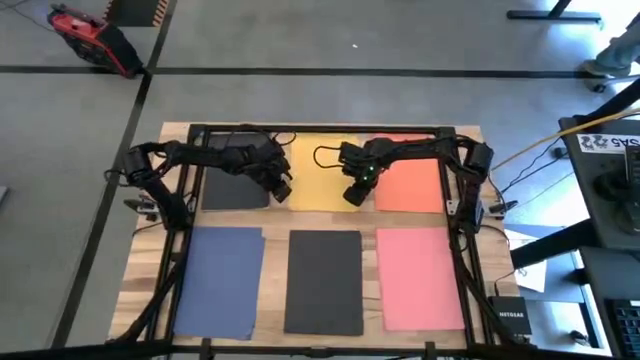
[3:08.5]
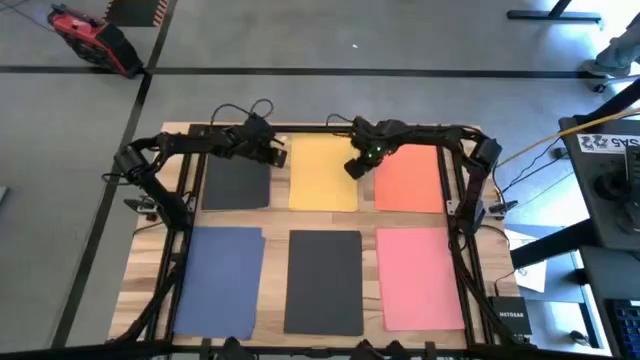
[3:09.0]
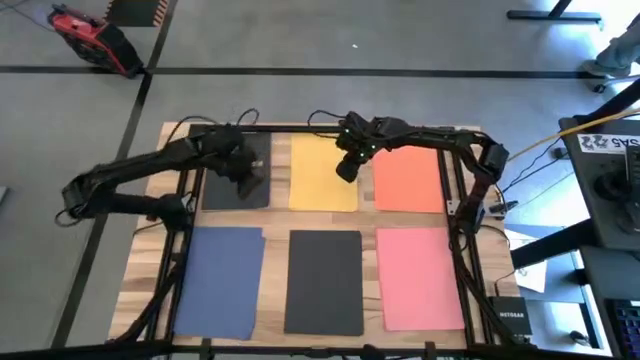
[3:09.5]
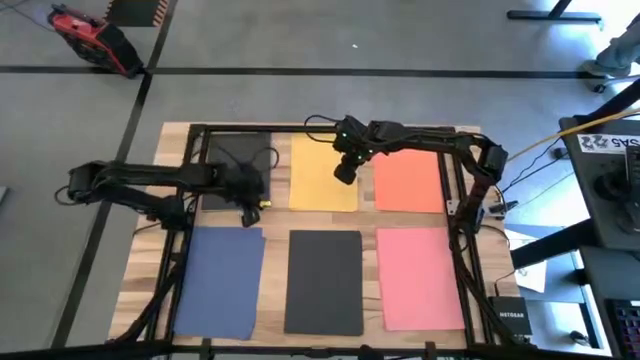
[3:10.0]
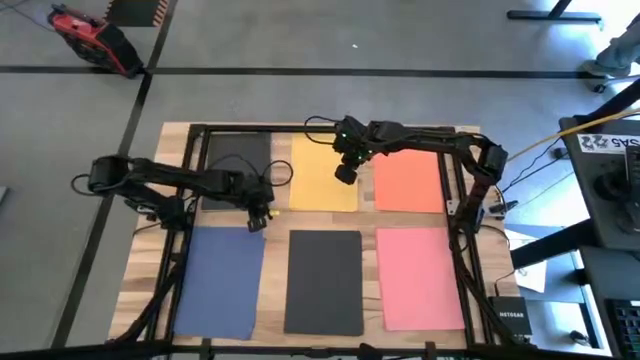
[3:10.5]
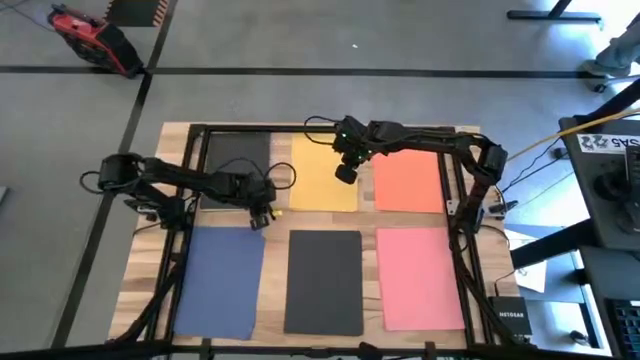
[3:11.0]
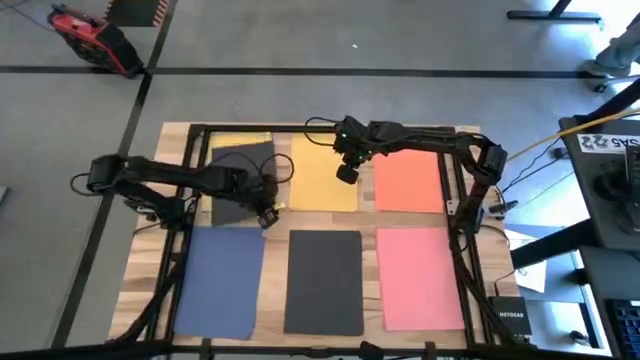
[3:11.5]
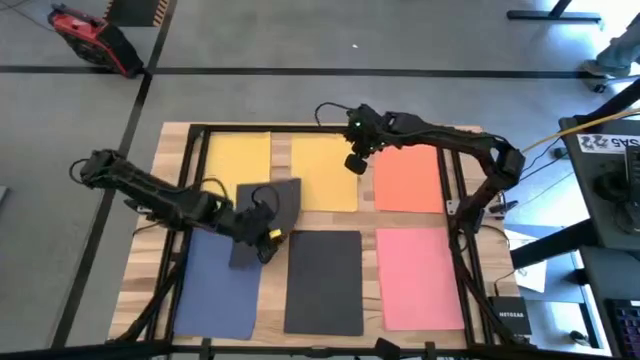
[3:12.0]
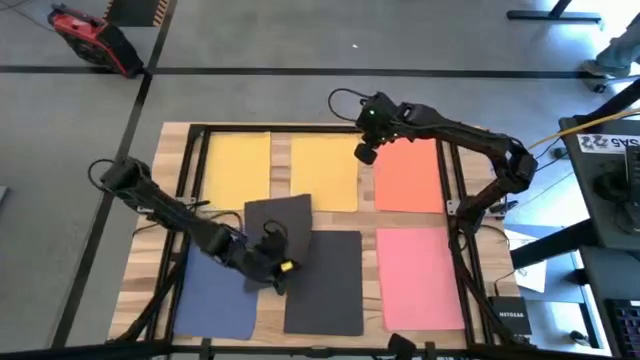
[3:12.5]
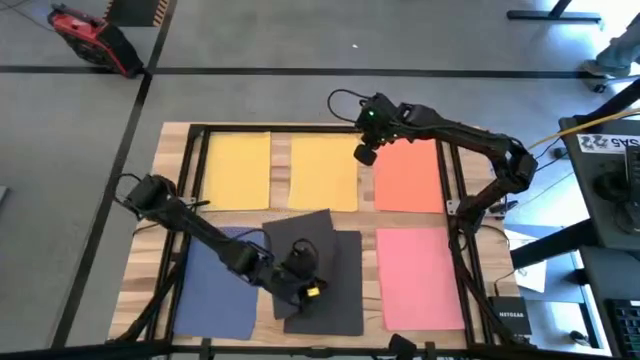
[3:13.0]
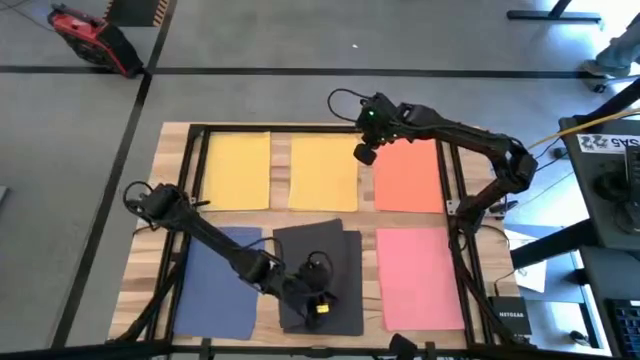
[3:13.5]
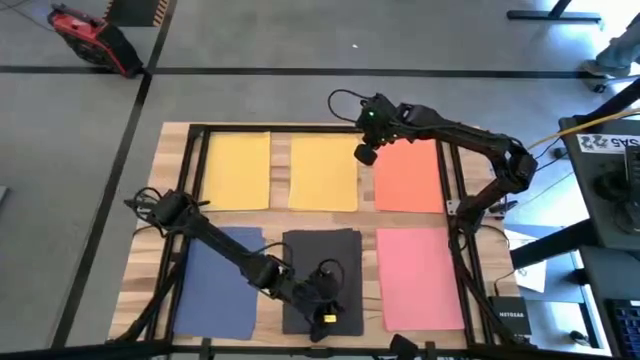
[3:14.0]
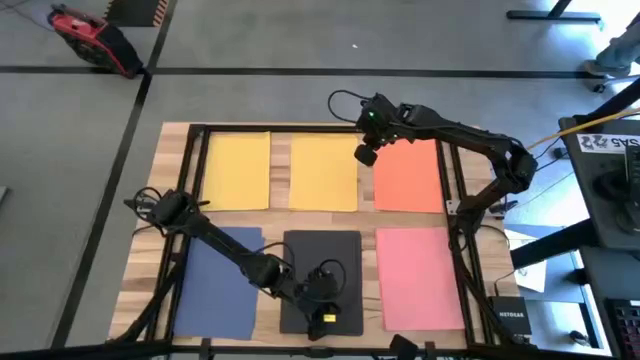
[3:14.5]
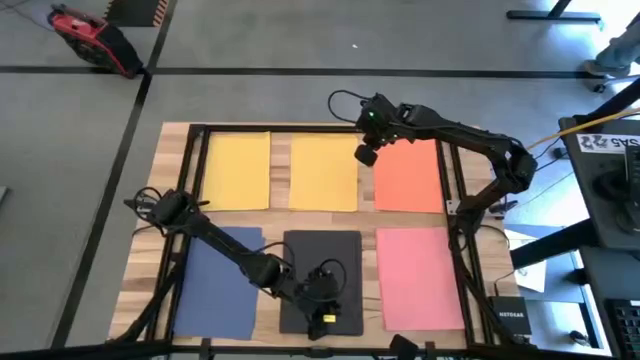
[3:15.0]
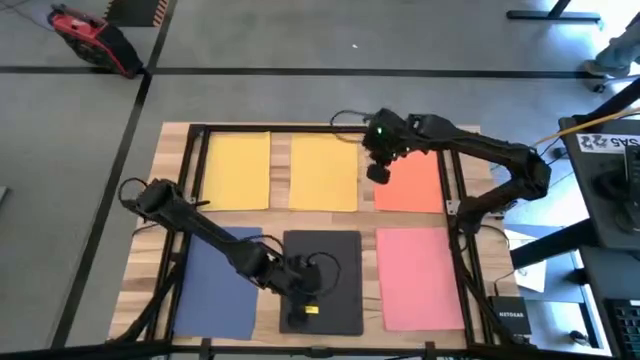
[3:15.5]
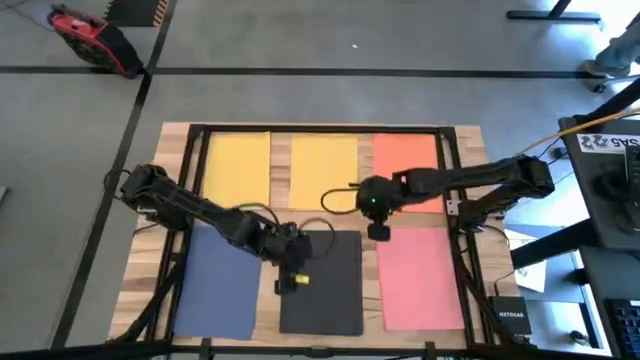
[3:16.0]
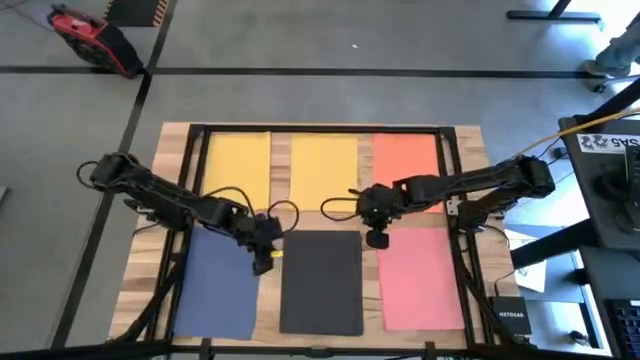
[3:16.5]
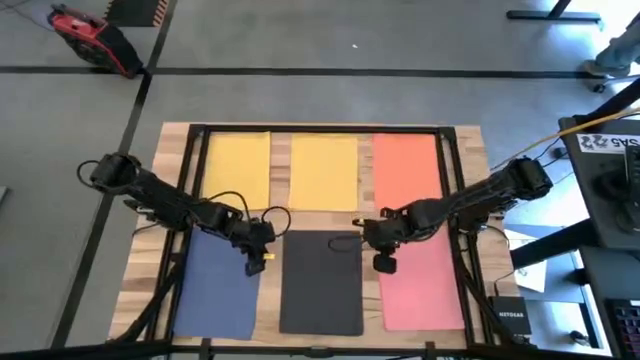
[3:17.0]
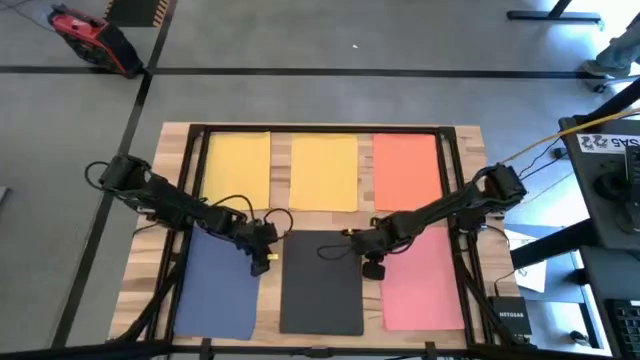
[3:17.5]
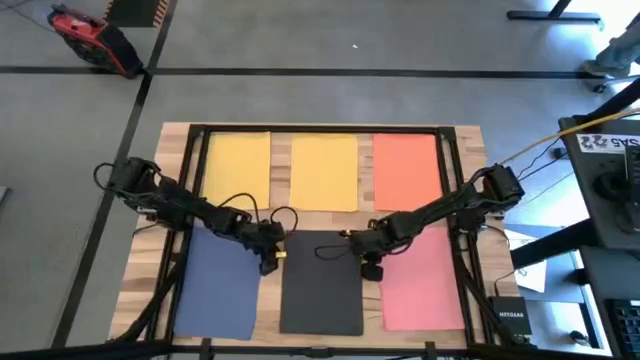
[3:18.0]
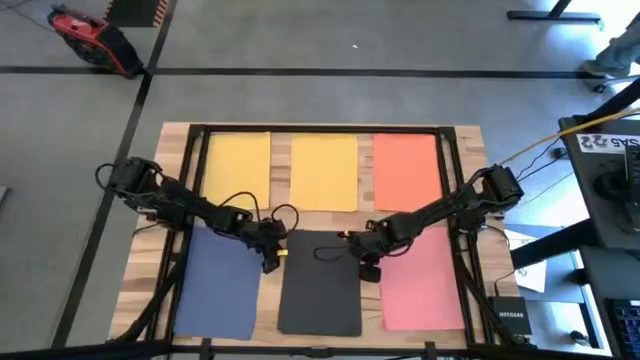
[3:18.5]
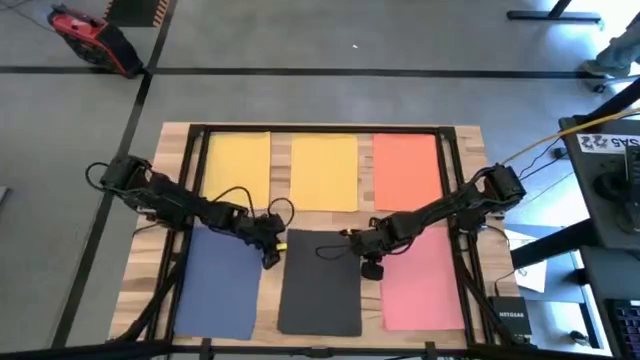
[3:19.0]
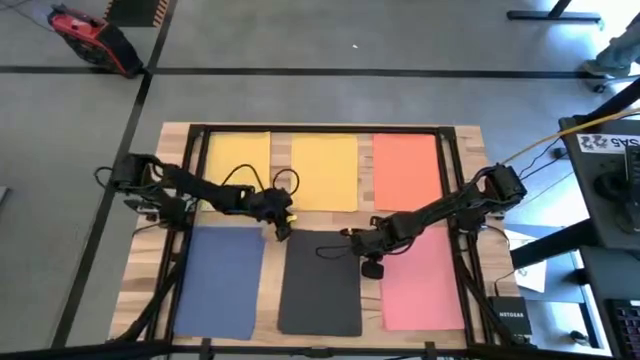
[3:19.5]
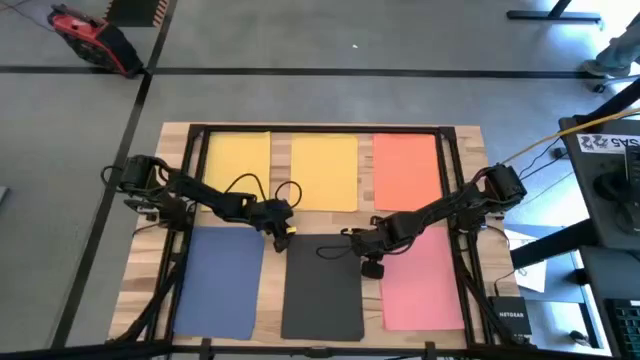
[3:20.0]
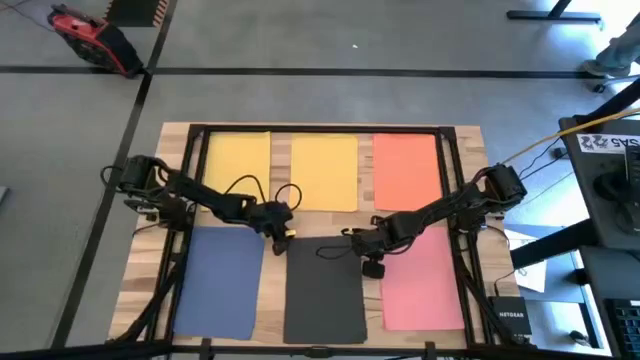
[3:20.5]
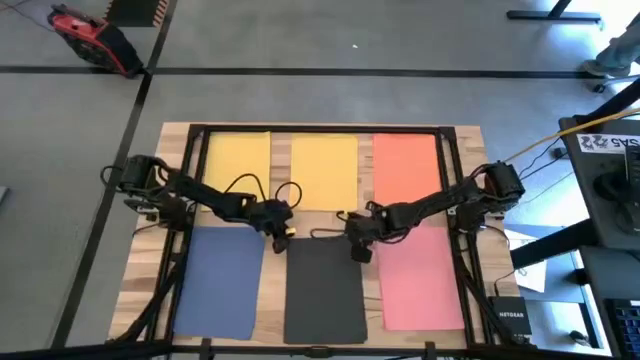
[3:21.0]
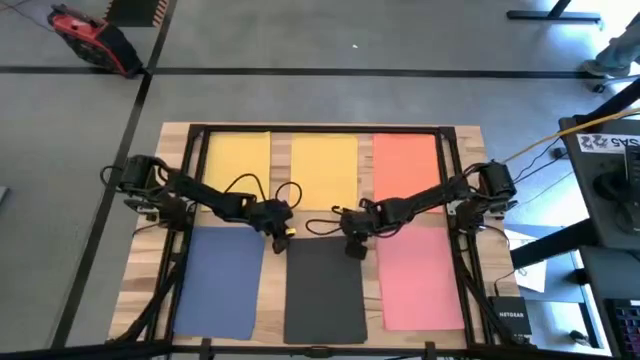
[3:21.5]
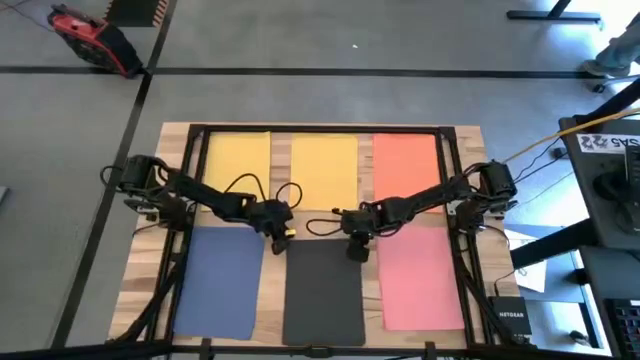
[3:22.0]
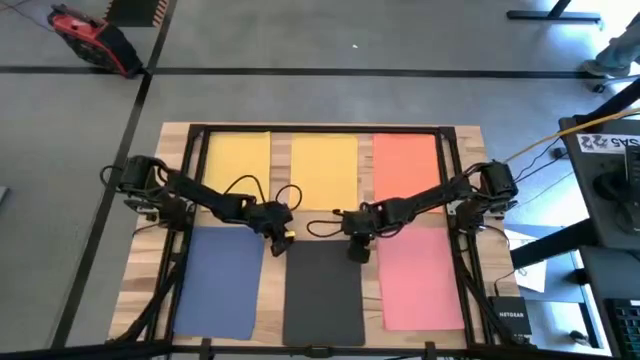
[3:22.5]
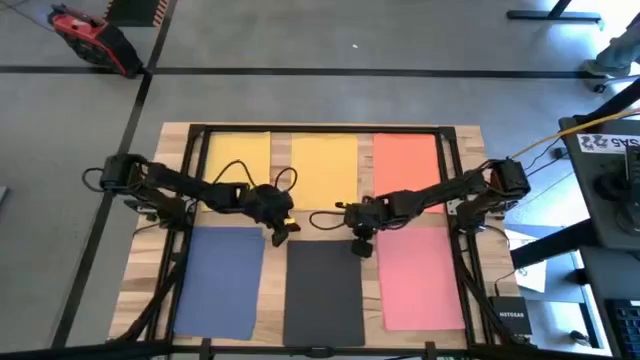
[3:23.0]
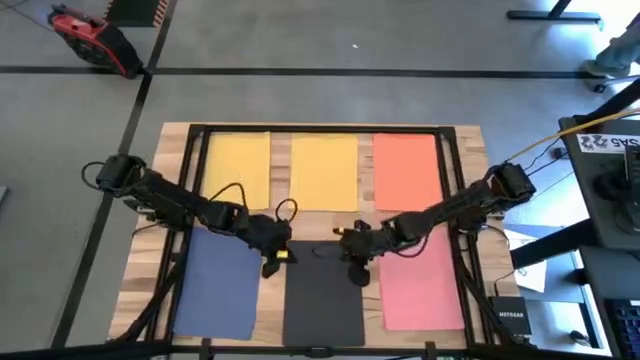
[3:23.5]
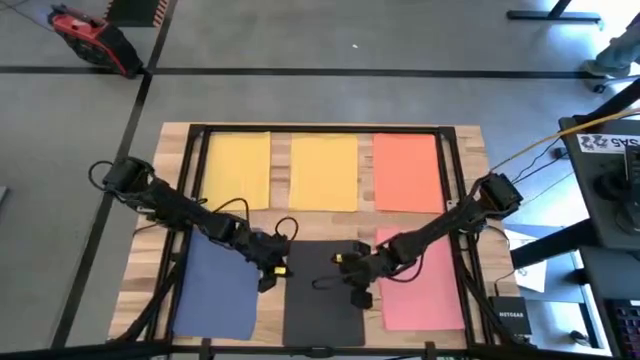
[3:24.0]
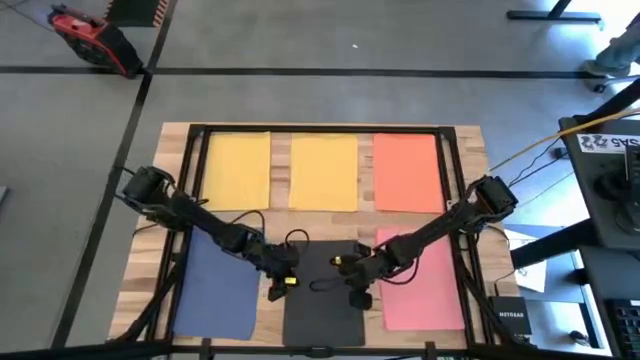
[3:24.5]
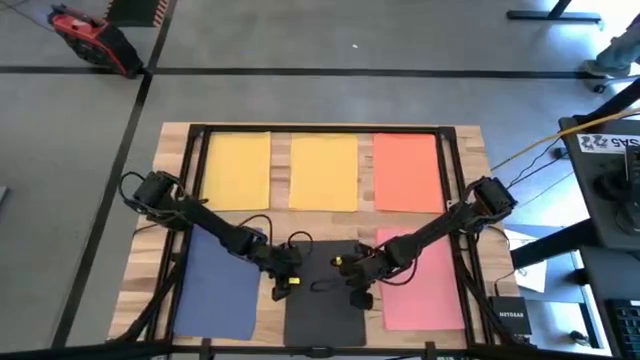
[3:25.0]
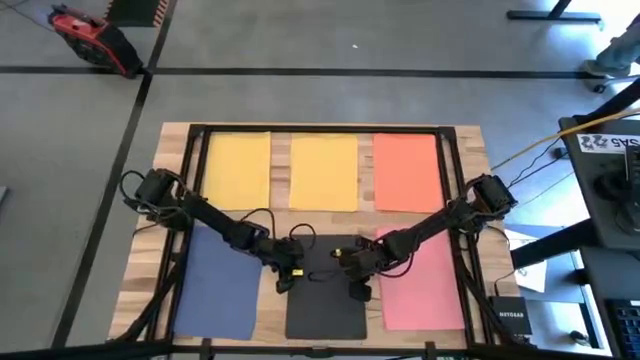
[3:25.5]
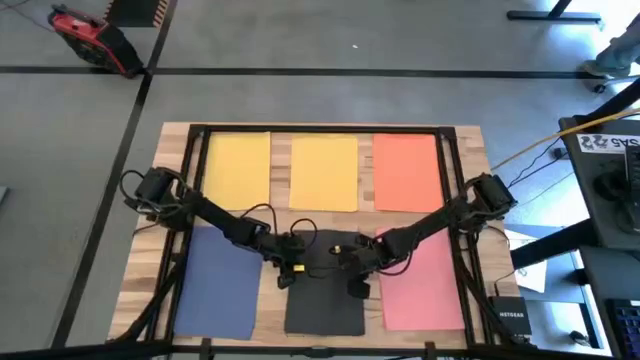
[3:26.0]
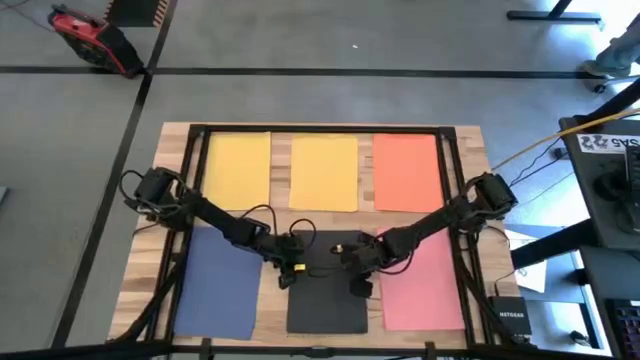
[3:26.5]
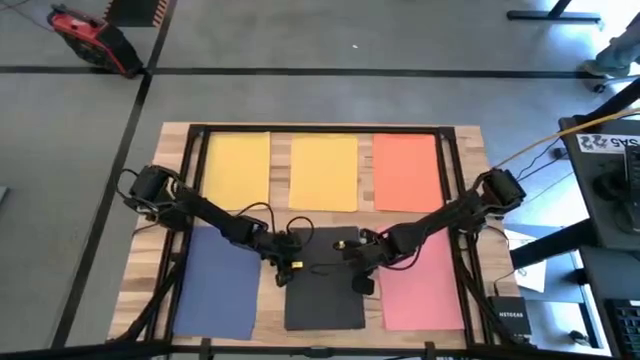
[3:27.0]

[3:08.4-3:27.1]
Task: Organize paper
Stack the black colored paper on top of the black colored papers

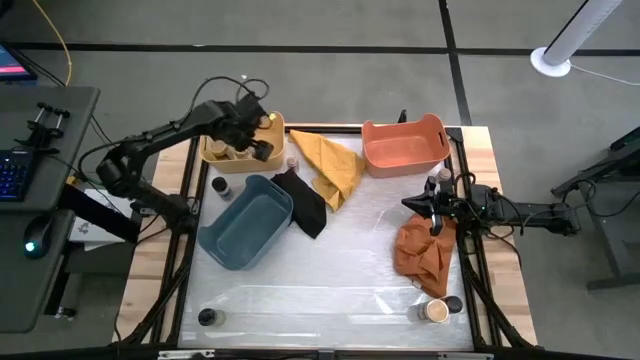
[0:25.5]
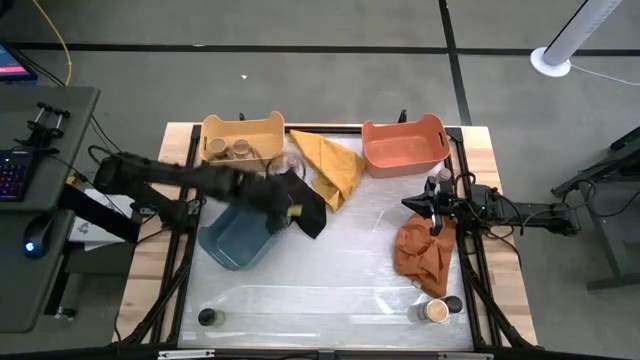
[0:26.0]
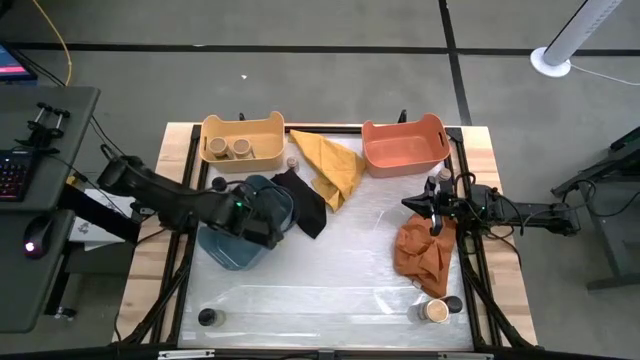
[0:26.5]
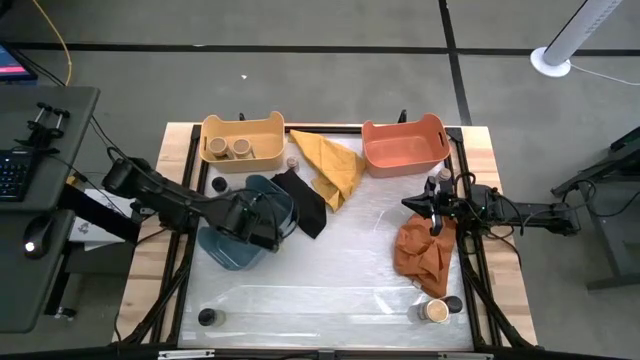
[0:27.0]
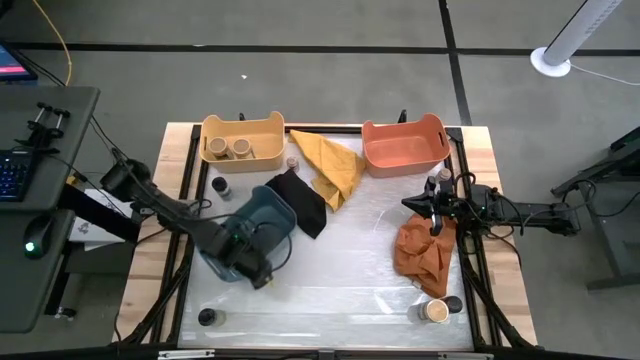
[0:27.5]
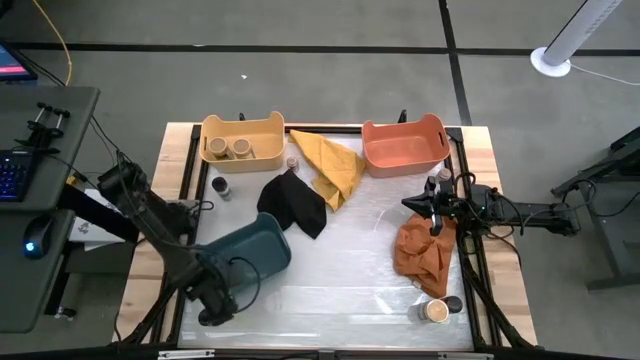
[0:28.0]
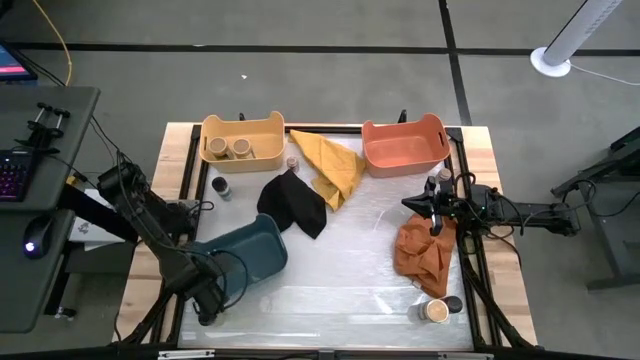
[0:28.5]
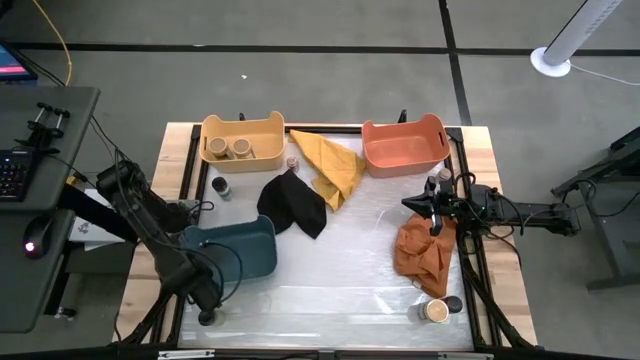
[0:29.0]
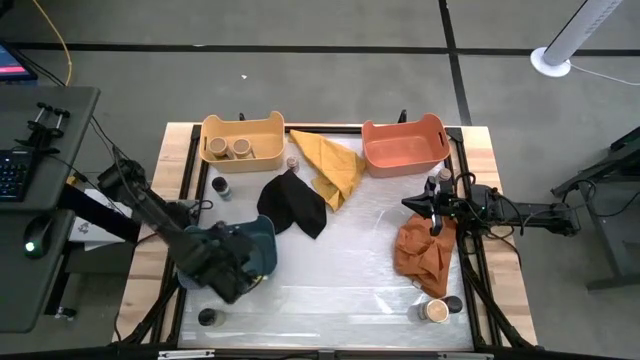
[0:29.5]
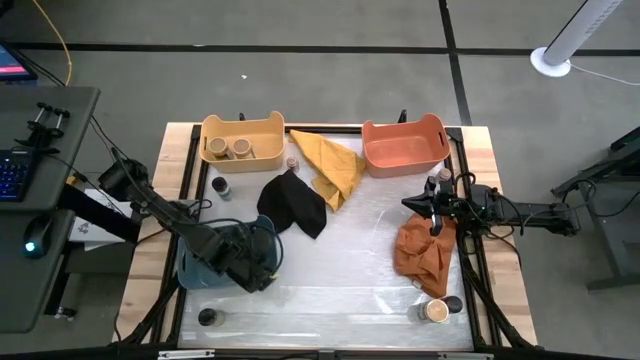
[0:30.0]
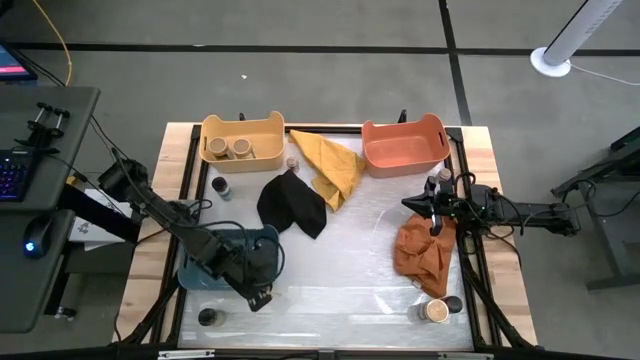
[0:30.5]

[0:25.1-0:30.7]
Task: Sort spices by type
Adjust the blue bin
